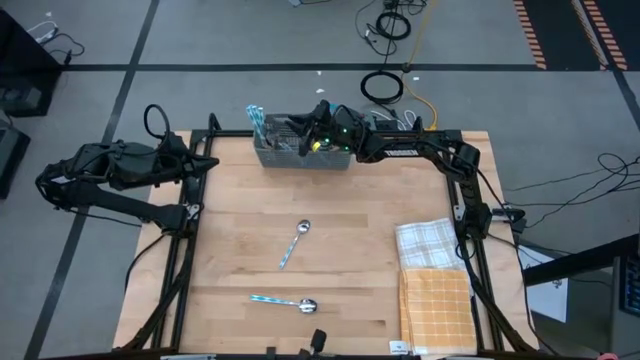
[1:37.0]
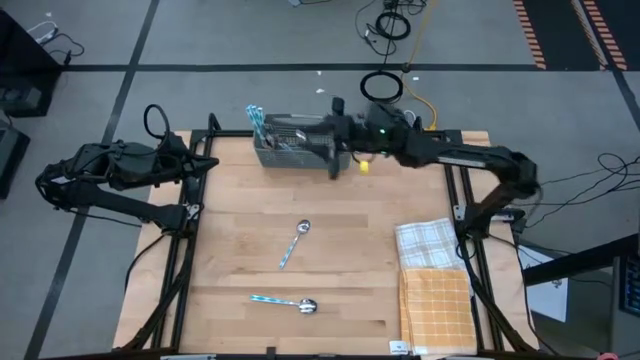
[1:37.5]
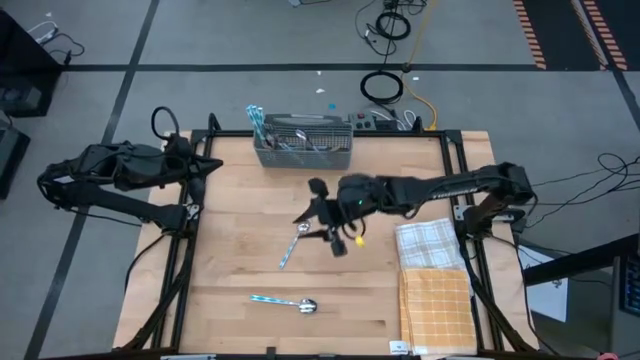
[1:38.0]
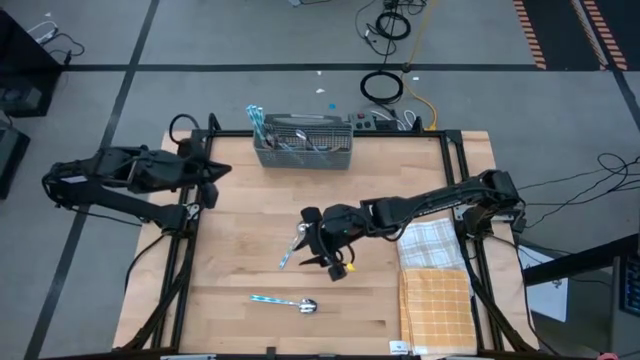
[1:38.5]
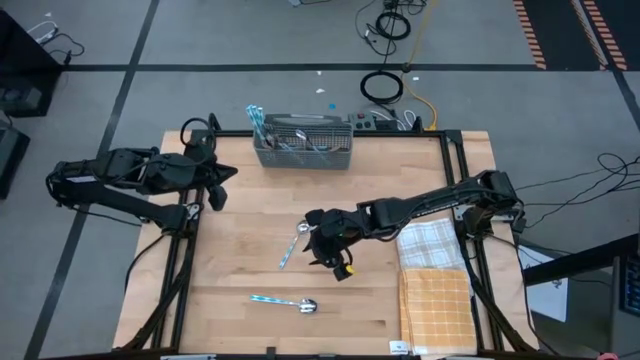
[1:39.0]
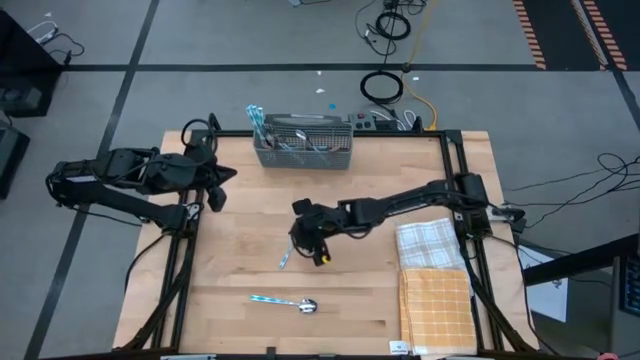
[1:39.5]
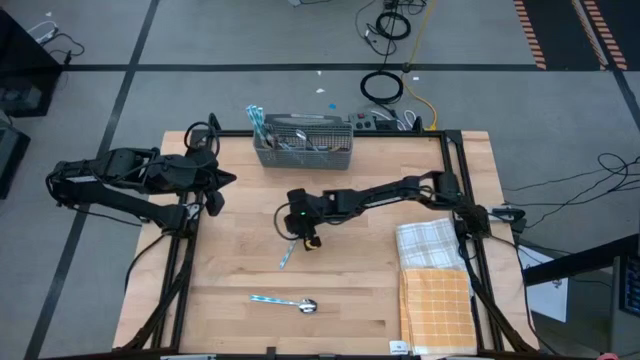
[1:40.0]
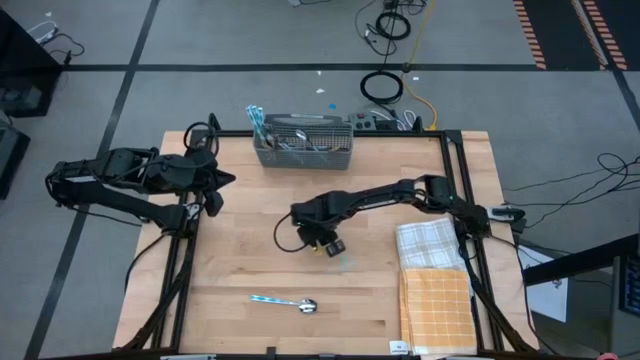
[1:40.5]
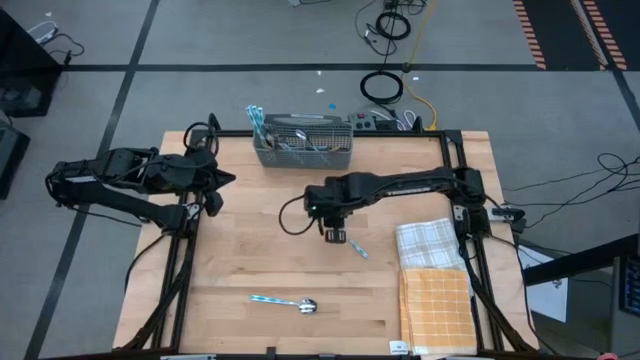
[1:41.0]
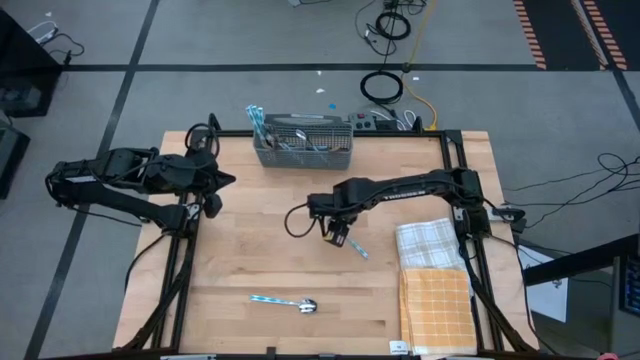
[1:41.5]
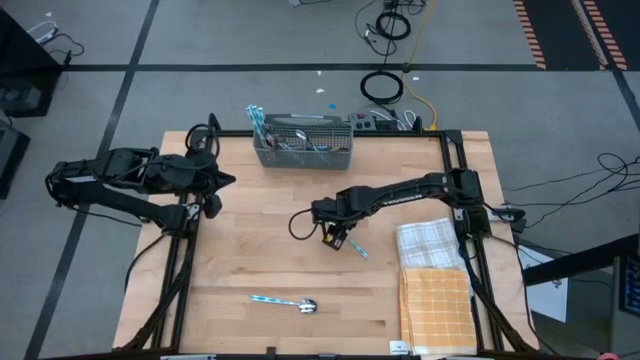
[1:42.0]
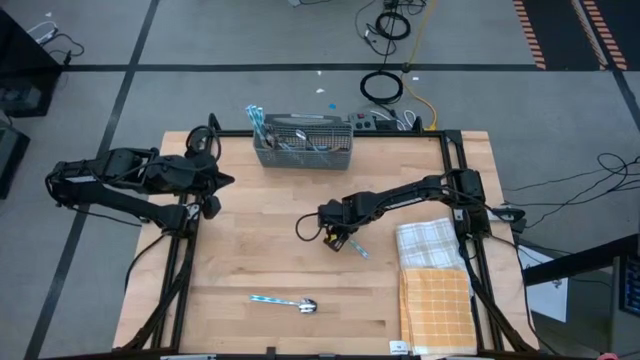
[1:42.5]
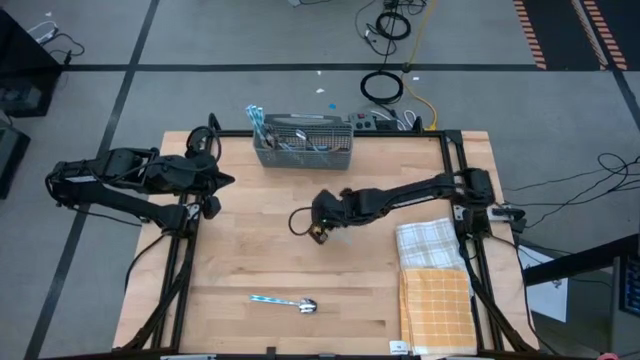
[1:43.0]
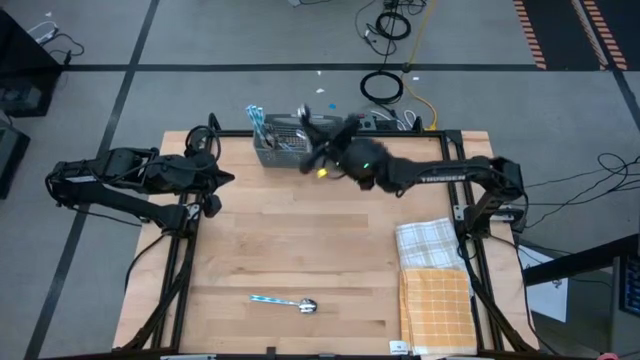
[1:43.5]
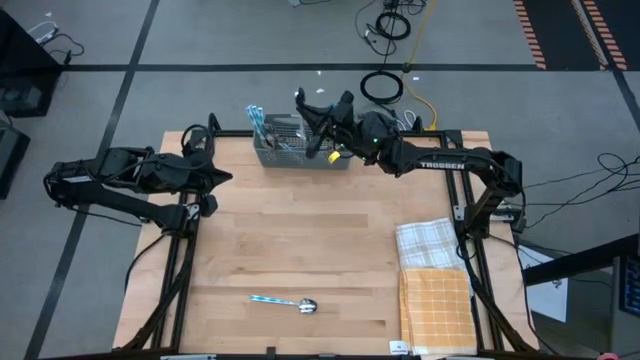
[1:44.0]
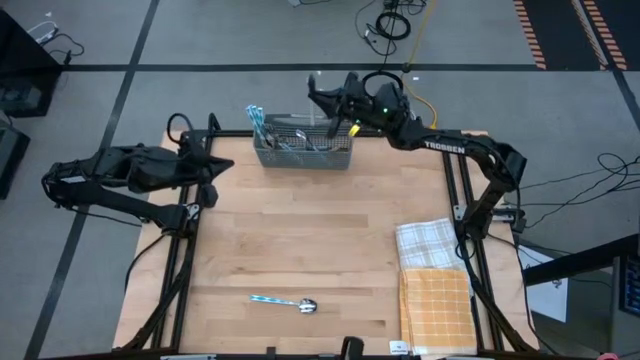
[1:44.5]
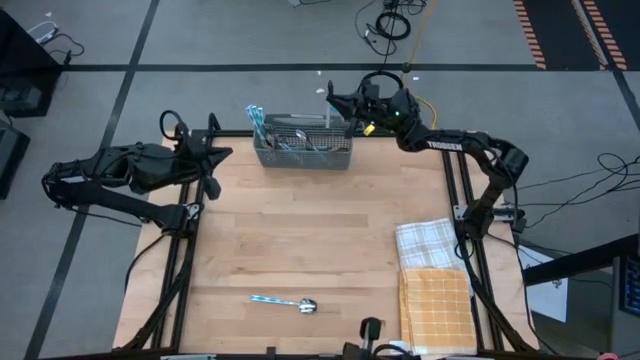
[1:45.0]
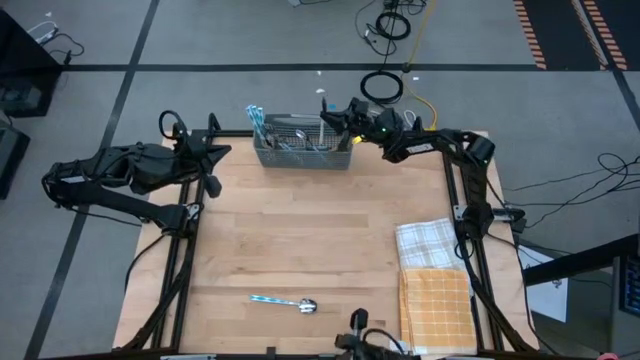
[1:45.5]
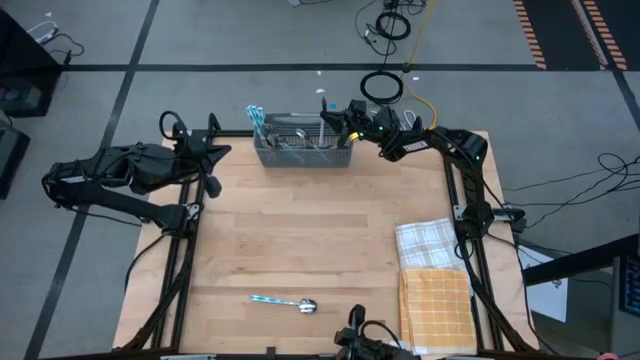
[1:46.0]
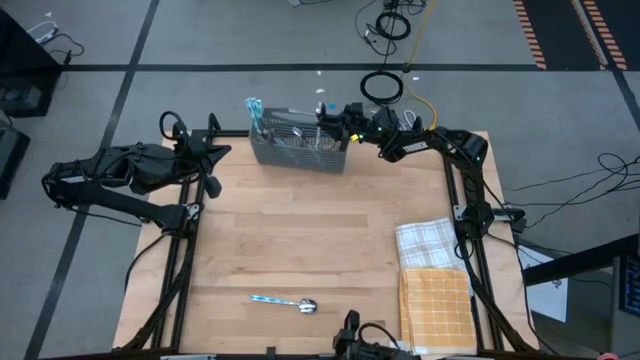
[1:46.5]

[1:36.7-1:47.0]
Task: Sort silverware
Put the top spoon into the middle right section of the utensil holder

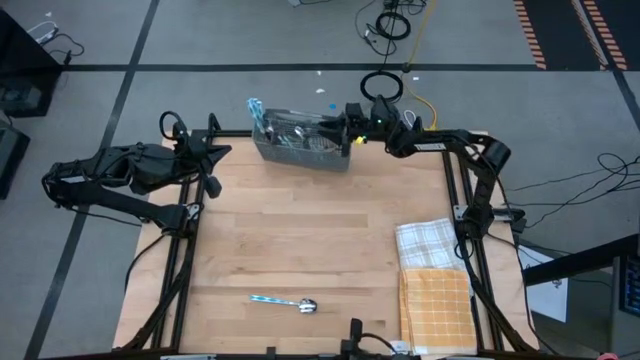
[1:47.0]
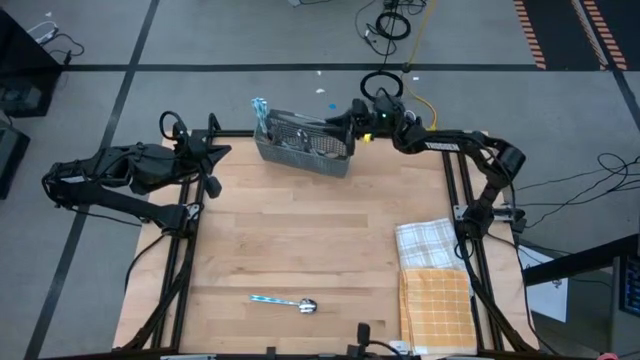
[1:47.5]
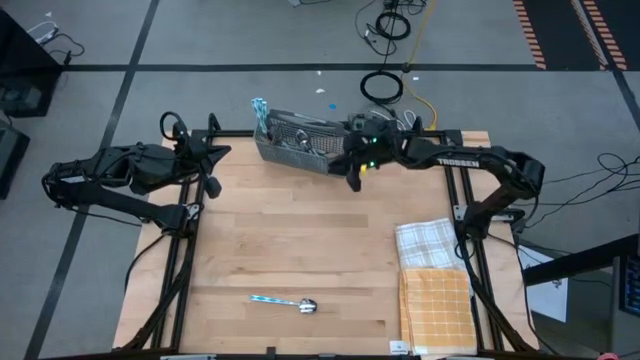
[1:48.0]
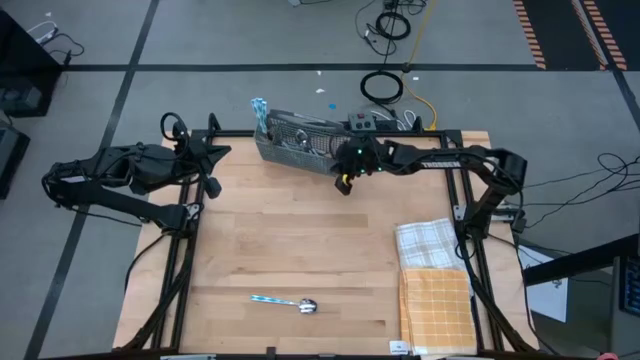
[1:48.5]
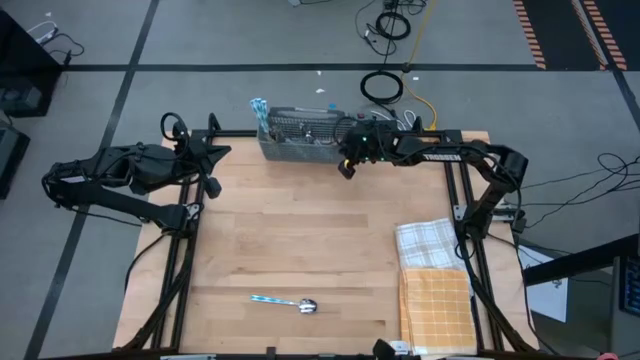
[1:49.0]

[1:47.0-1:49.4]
Adjust the utensil holder

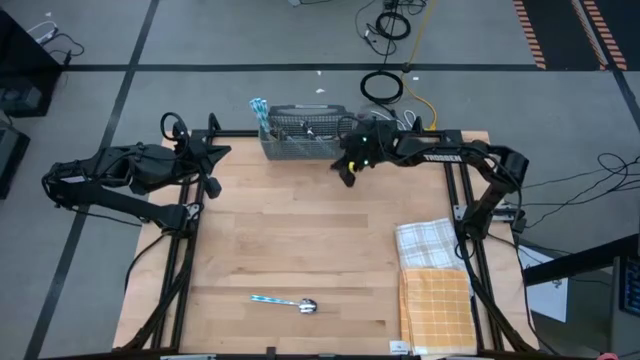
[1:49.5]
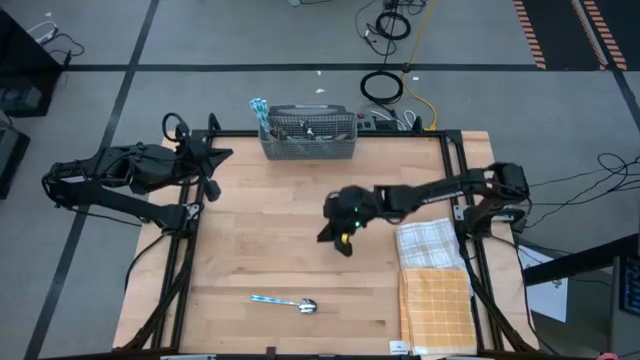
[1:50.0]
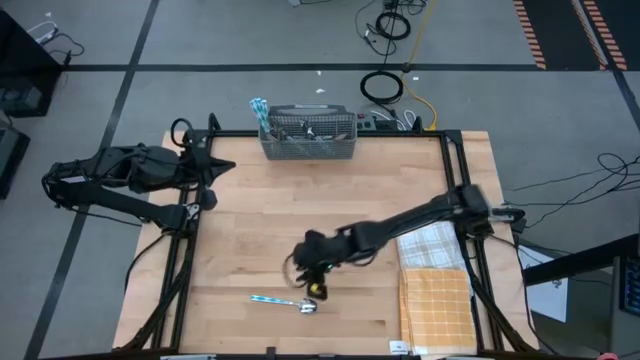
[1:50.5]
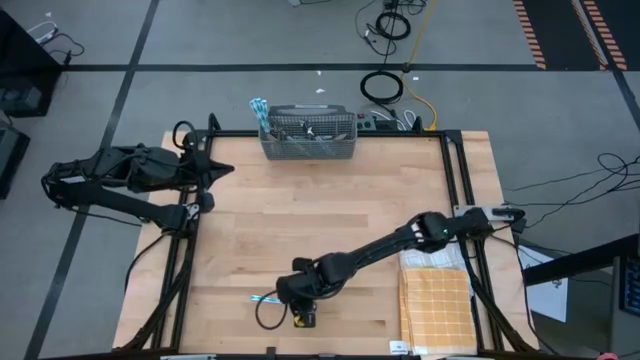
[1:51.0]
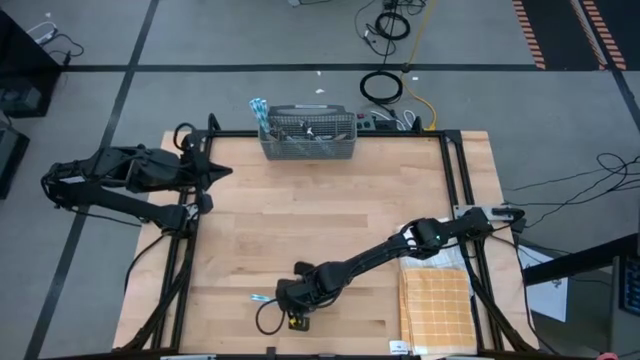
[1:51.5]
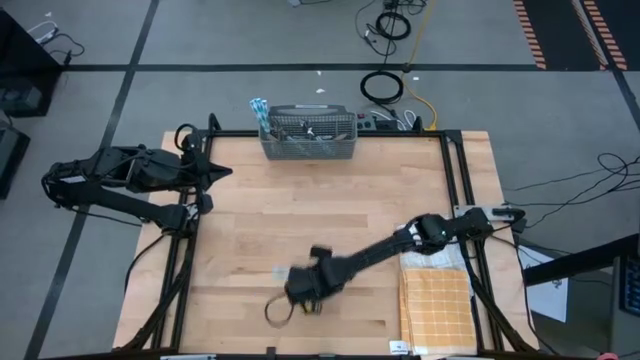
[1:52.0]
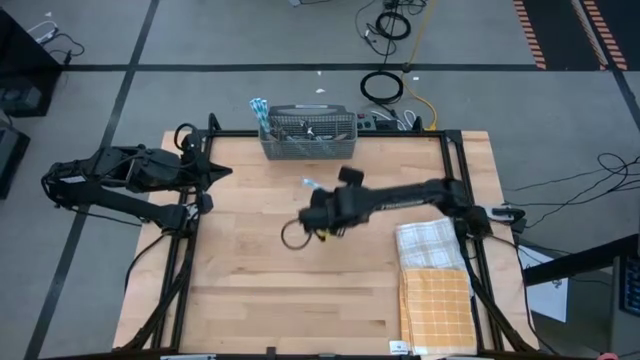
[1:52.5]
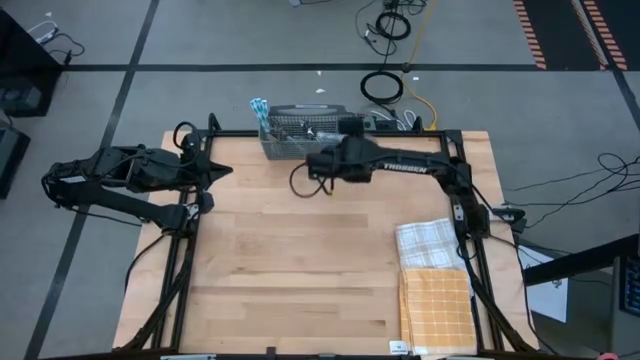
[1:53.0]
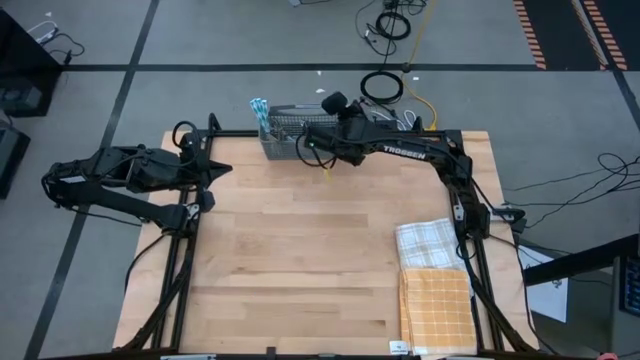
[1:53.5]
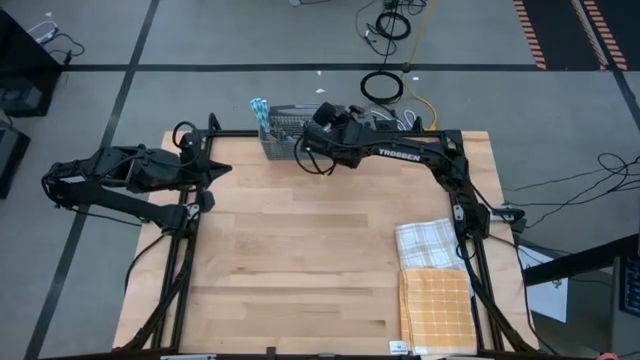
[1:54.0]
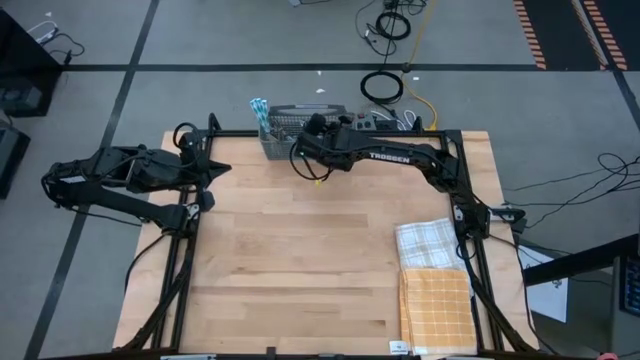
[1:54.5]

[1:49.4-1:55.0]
Put the spoon into the middle right section of the utensil holder

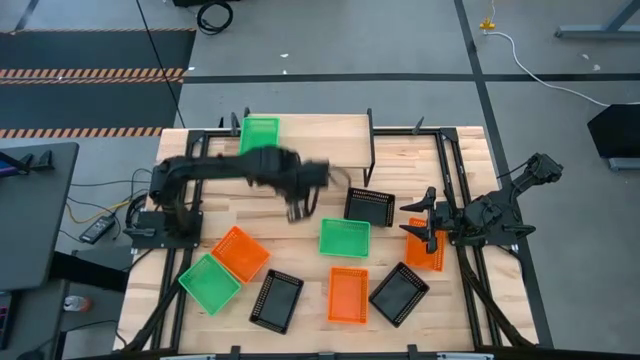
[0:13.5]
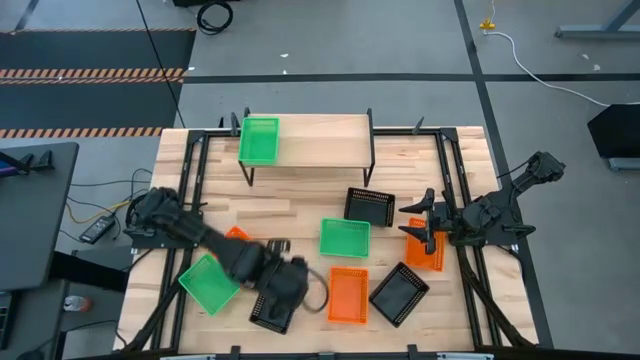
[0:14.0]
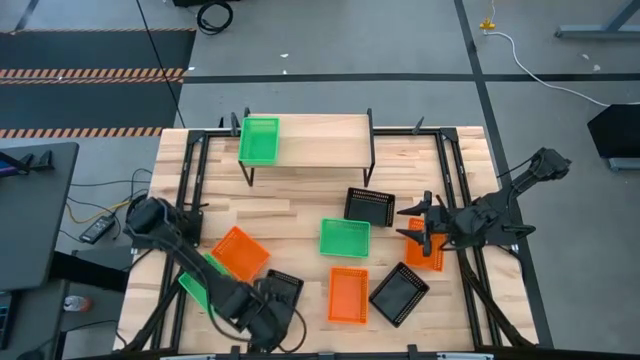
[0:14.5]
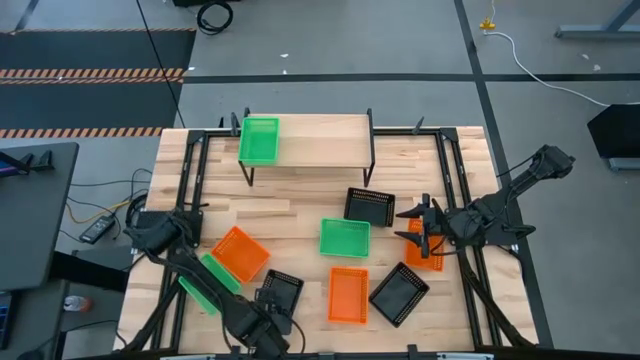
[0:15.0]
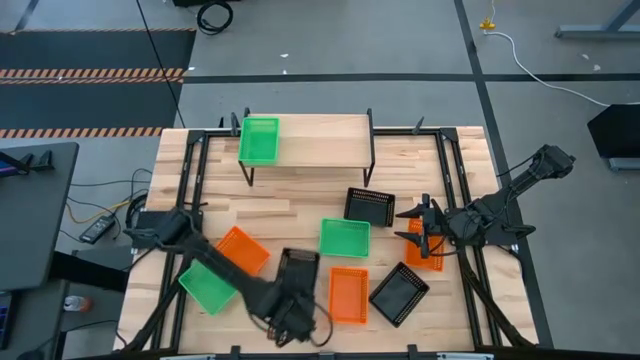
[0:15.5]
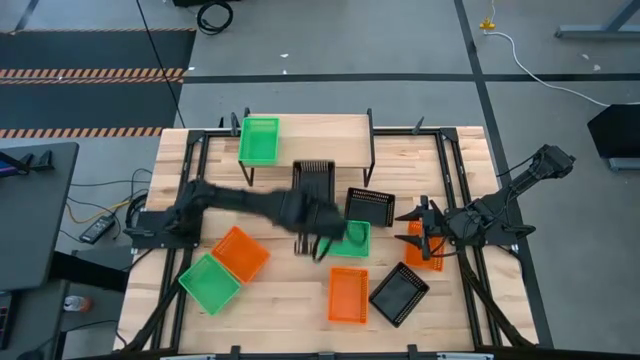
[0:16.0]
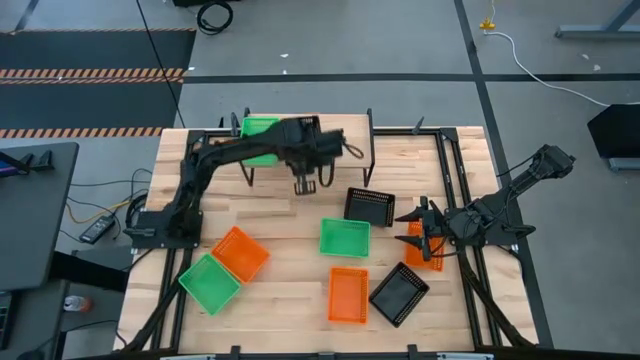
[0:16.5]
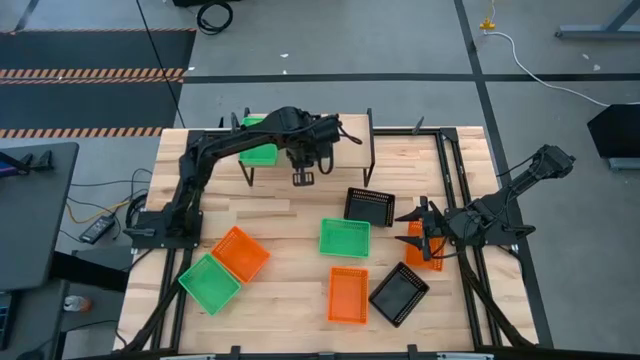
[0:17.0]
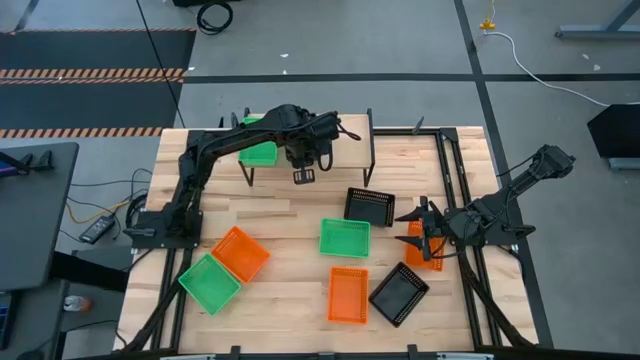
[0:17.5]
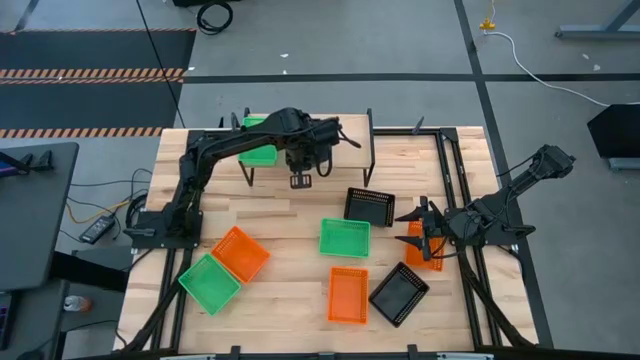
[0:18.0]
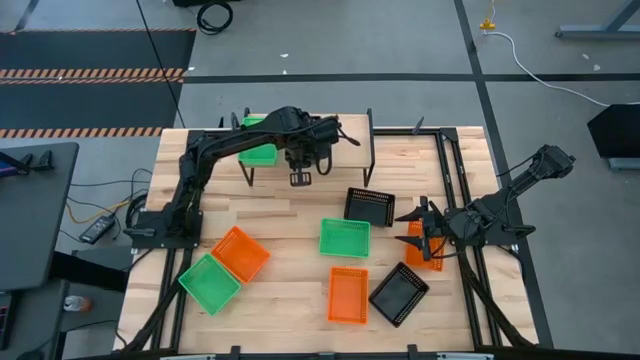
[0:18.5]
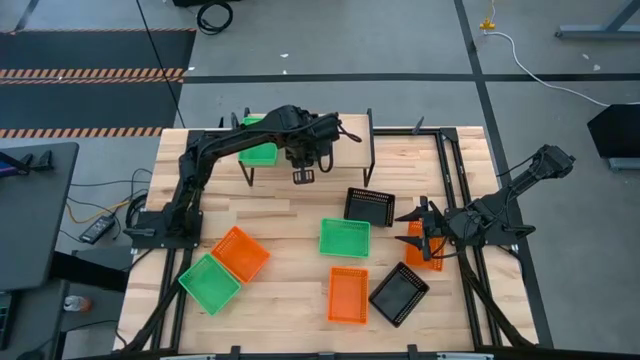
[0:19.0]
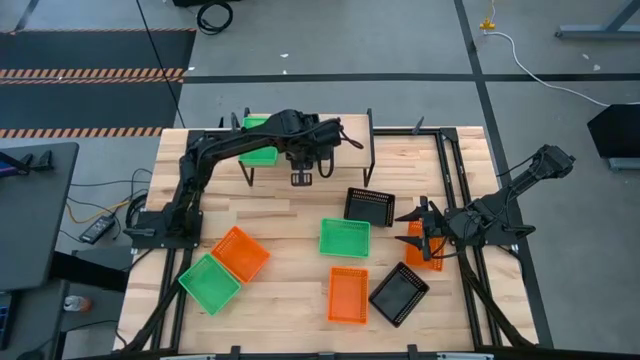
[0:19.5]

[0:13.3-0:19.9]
Task: Stack baskets on shelf by color
Put the left black bin on the shelf
